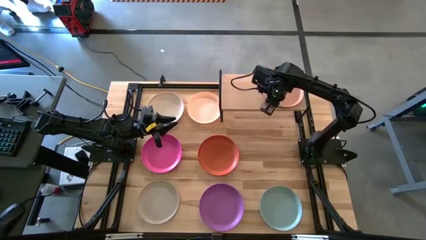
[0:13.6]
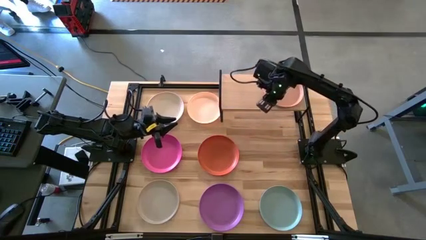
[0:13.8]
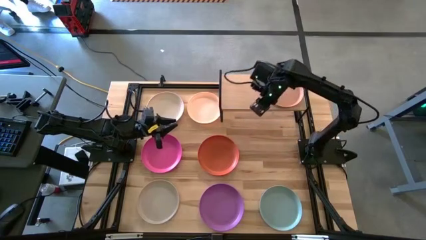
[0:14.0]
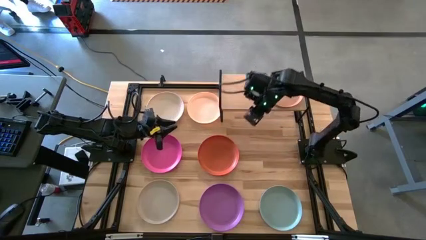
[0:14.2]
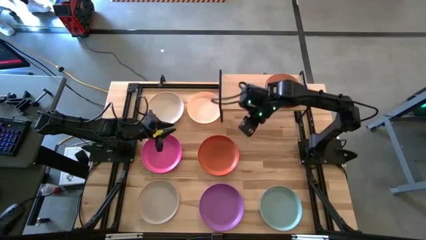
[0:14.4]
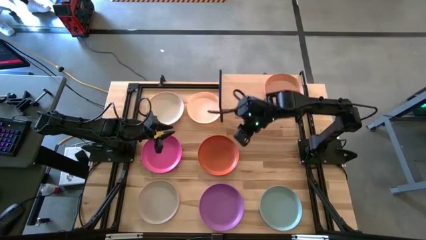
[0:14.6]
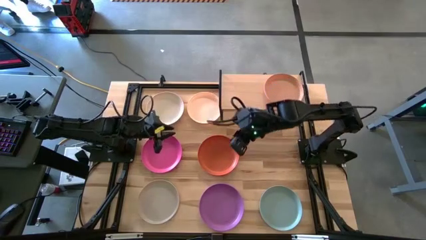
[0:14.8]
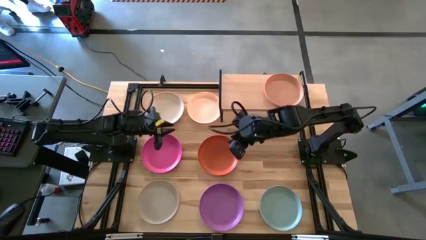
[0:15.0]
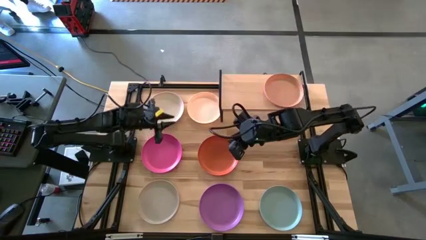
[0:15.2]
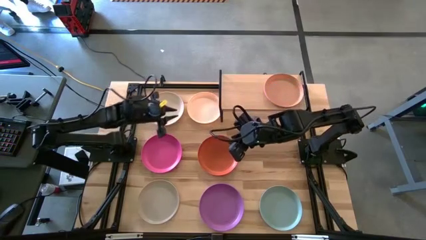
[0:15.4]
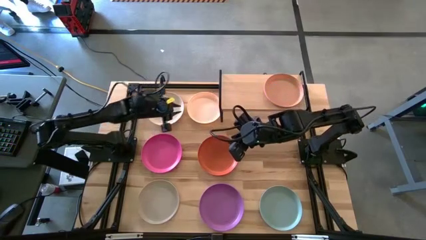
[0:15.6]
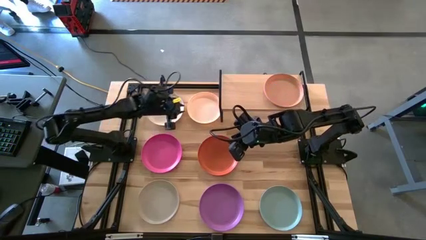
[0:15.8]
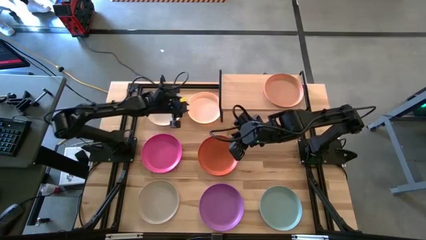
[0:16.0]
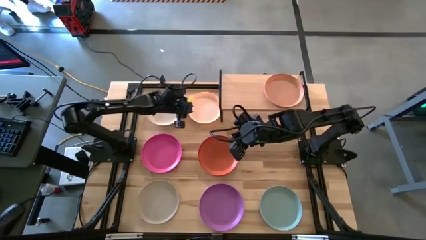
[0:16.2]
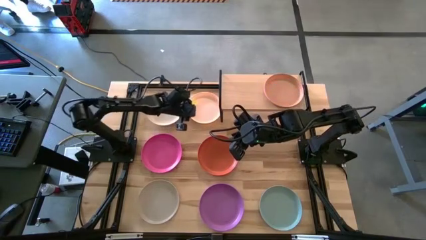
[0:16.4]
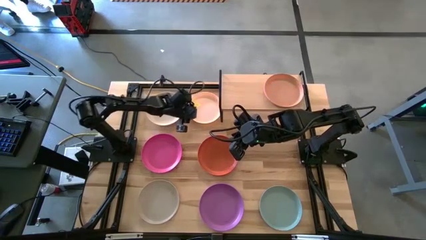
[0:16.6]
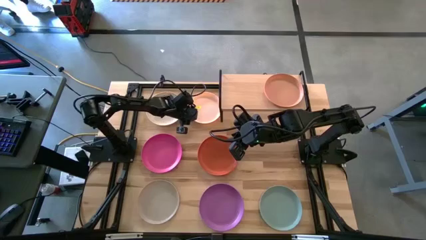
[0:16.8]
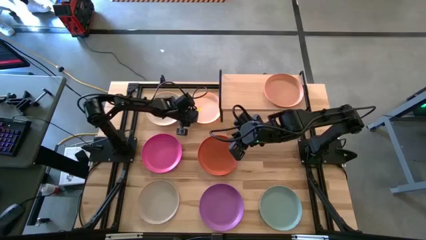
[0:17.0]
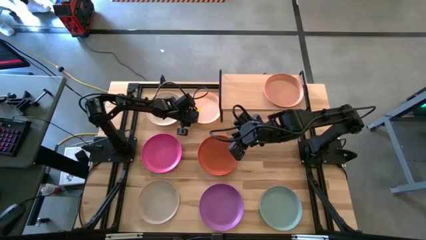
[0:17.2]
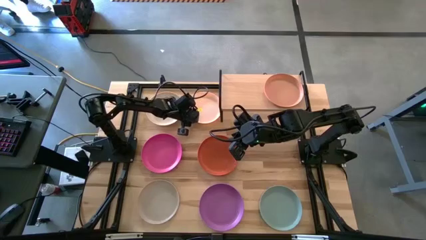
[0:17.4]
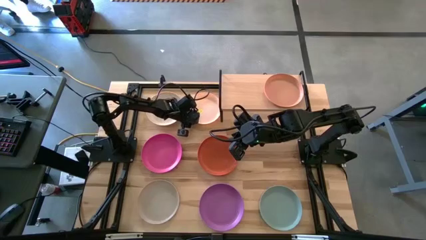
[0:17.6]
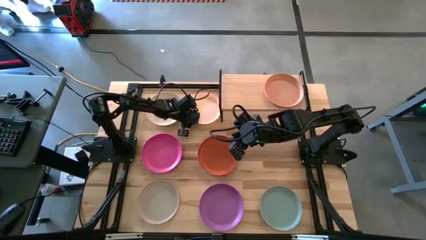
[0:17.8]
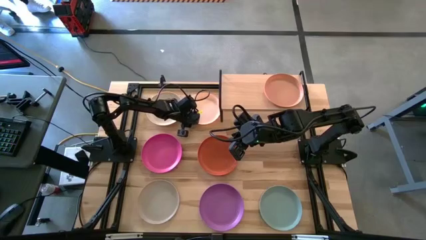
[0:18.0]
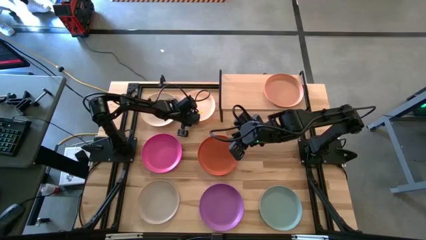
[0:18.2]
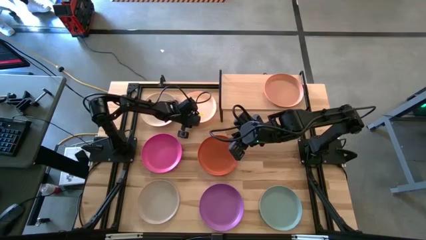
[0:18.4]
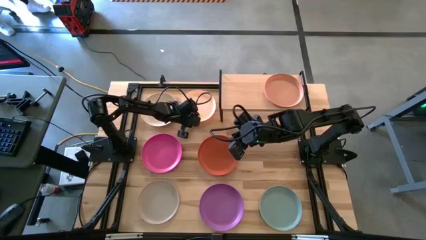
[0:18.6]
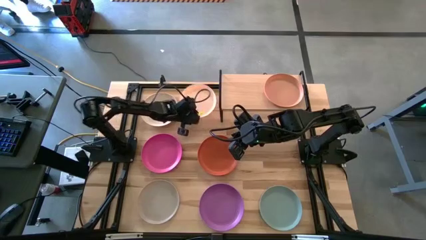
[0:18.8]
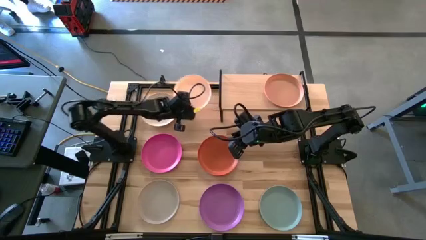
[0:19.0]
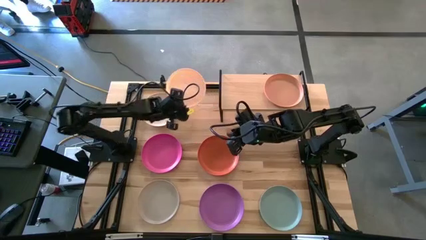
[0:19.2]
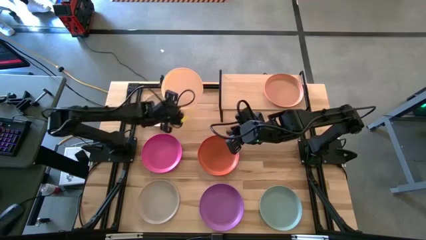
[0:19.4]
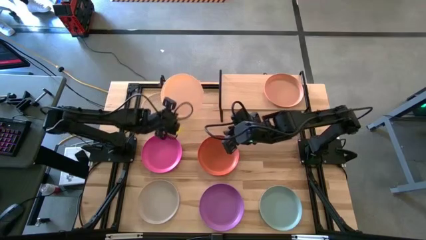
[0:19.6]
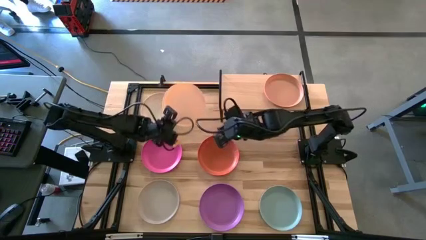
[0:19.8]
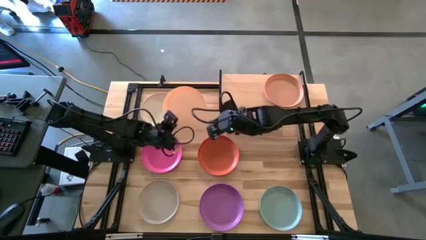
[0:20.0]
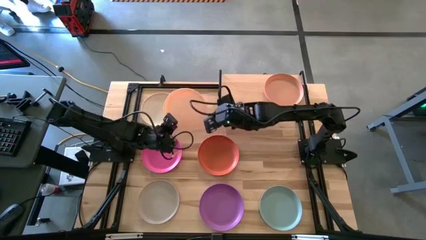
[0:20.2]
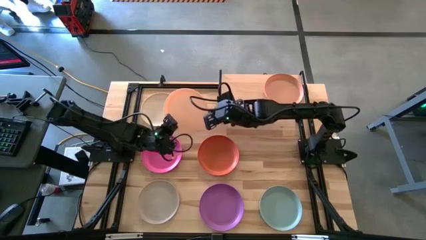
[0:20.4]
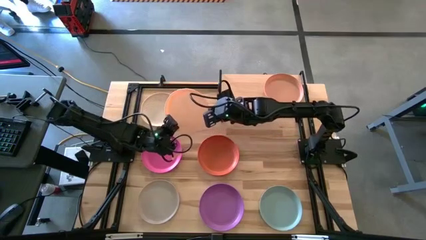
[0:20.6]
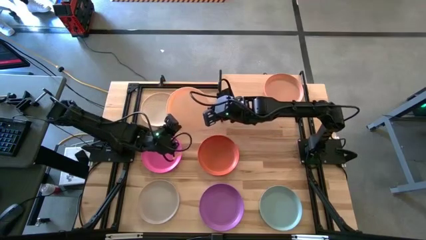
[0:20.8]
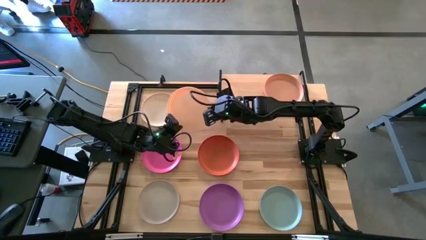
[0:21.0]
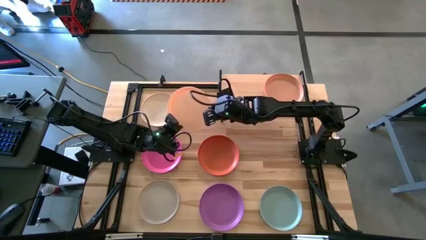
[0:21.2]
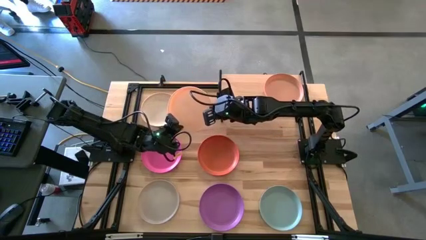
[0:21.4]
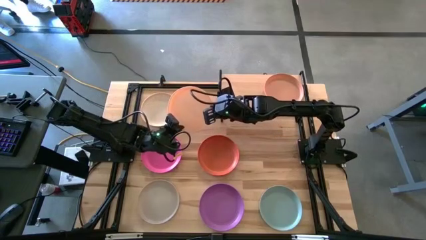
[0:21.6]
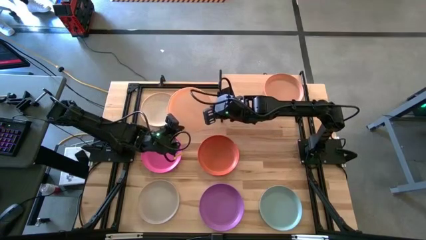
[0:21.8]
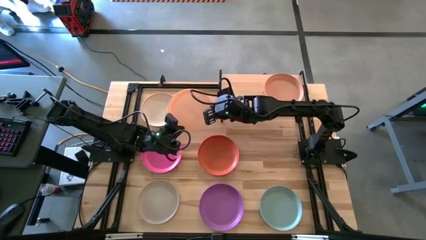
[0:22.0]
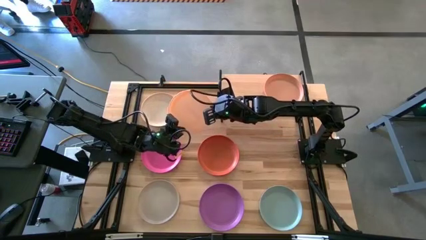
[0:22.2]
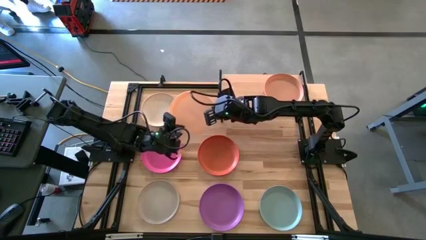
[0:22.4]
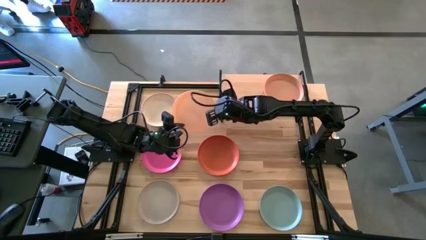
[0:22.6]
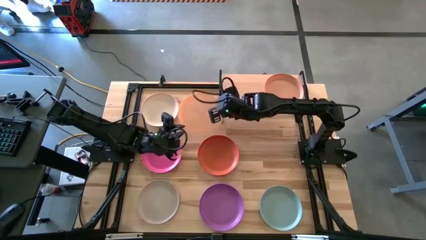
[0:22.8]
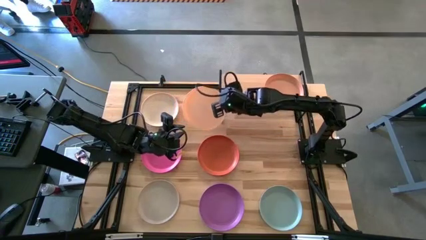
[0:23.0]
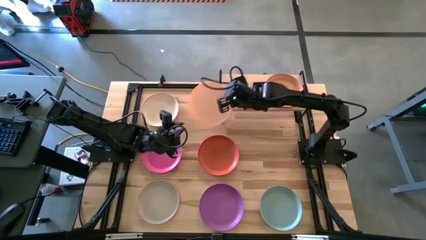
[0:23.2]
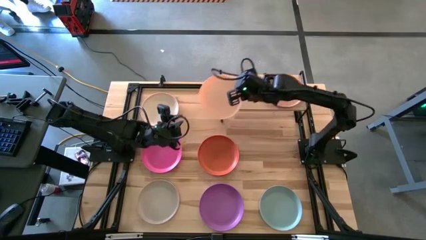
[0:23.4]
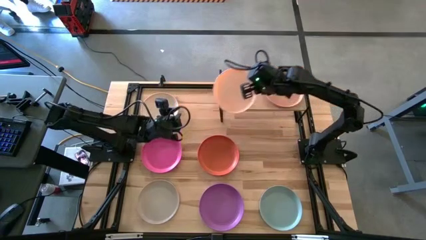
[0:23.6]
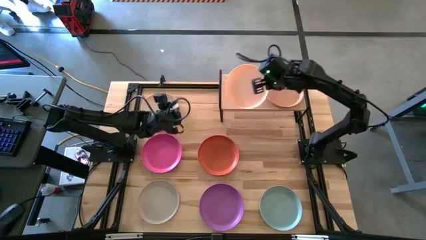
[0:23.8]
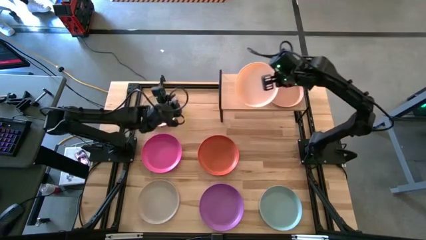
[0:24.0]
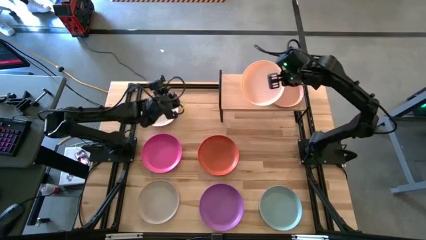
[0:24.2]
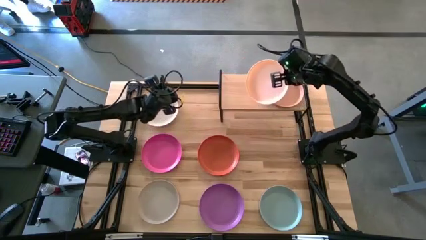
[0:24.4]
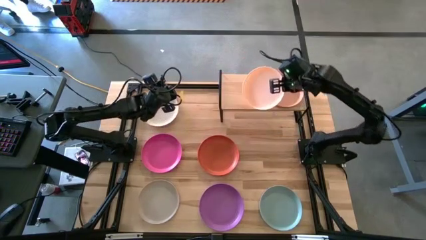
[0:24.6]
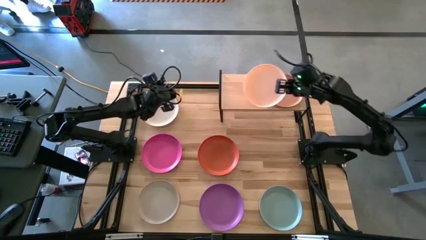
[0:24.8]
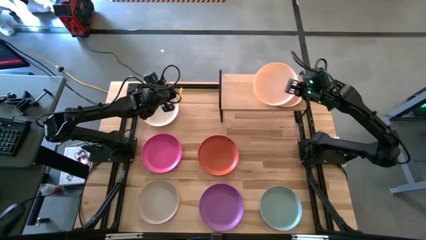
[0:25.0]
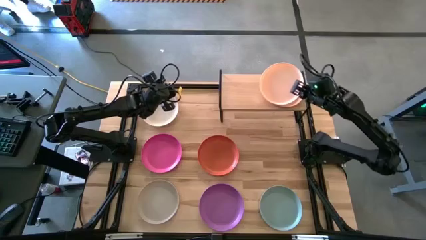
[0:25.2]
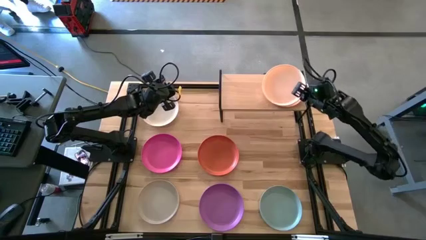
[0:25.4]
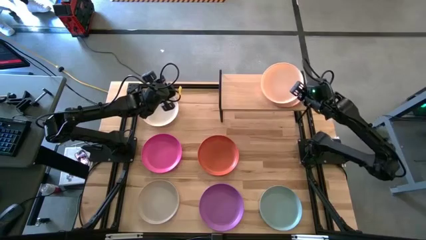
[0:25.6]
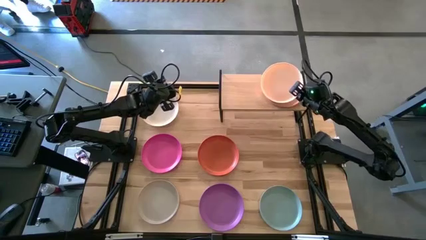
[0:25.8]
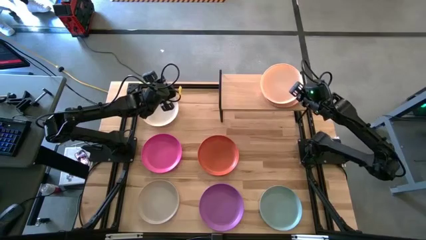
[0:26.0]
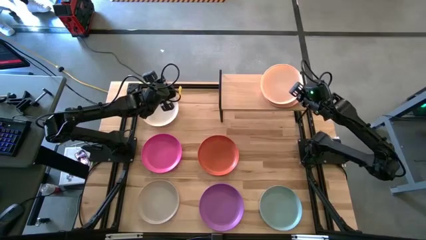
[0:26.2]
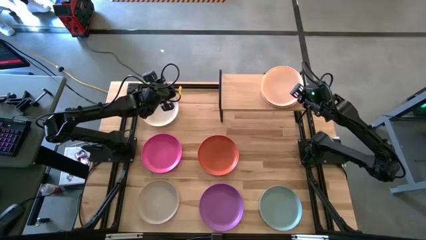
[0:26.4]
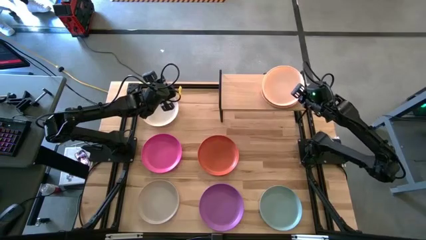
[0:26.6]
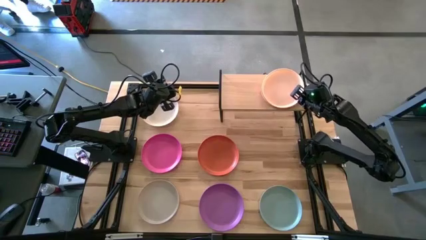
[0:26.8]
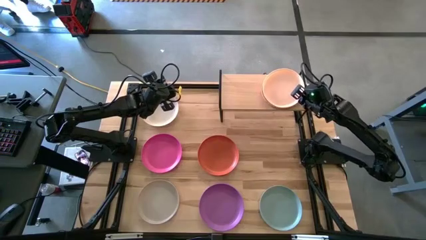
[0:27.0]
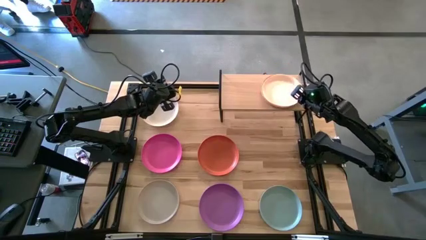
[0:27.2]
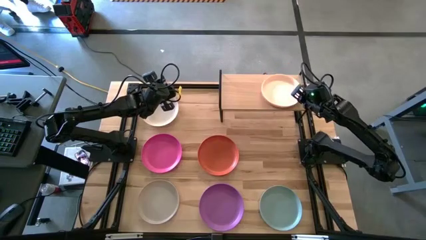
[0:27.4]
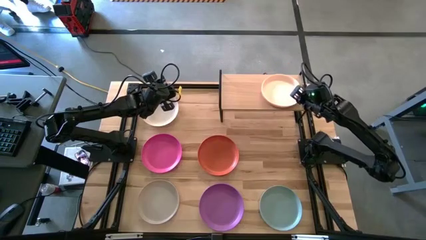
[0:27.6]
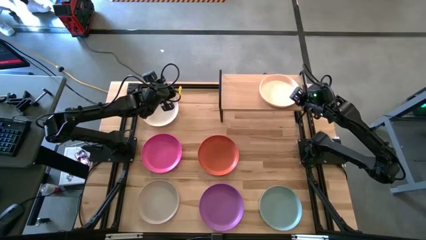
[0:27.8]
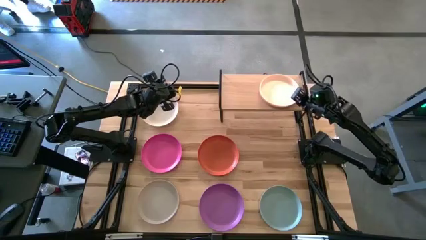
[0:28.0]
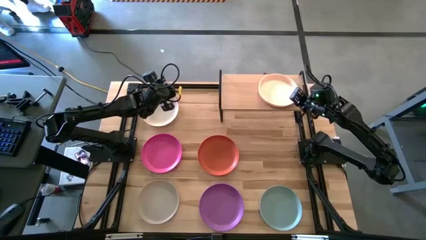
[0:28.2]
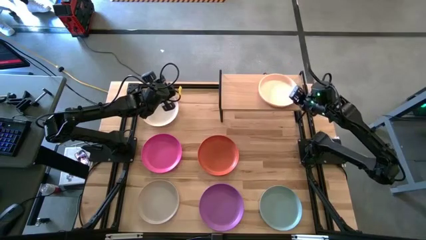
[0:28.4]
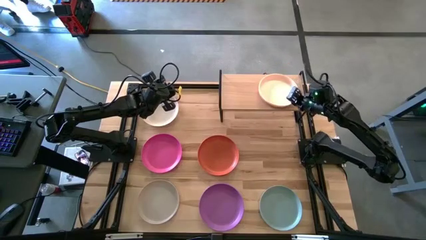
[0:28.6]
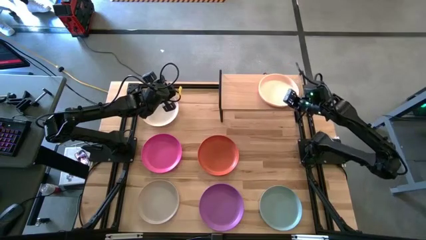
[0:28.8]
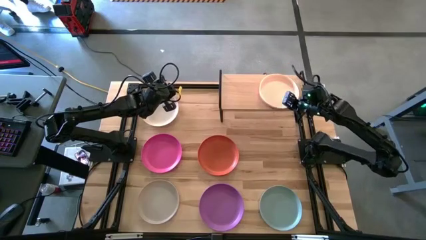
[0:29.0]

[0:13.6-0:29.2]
Task: Place and stack plates onto a shelf
Stack the light yellow plate on top of the light orange plate on the shelf
